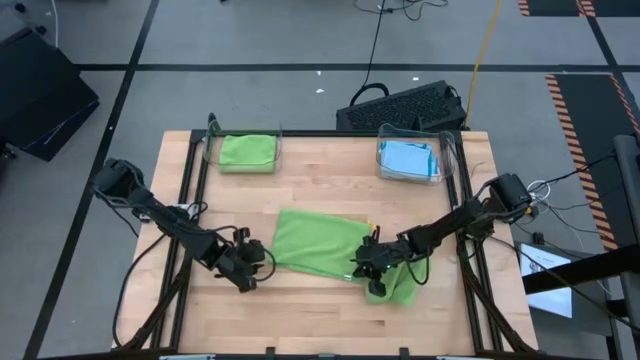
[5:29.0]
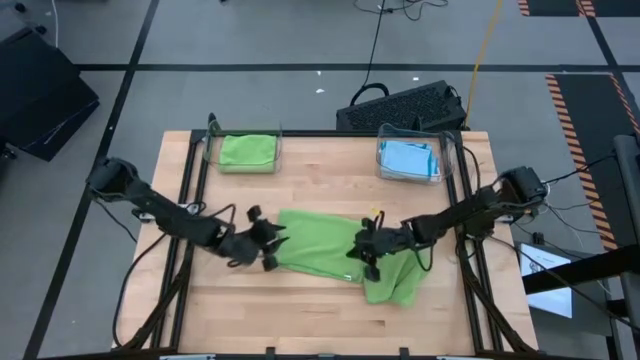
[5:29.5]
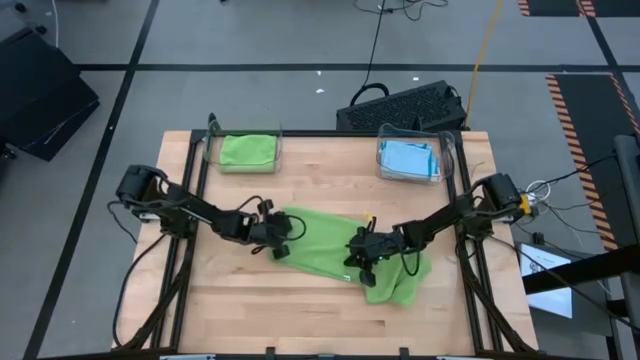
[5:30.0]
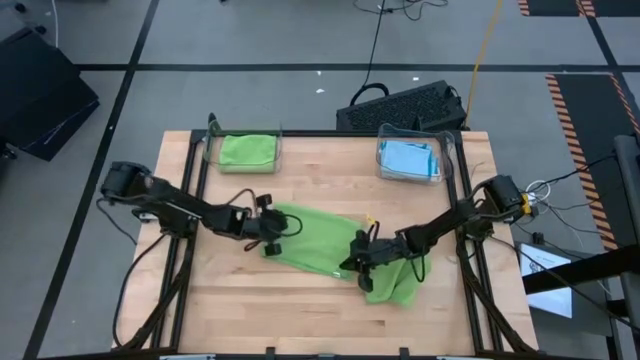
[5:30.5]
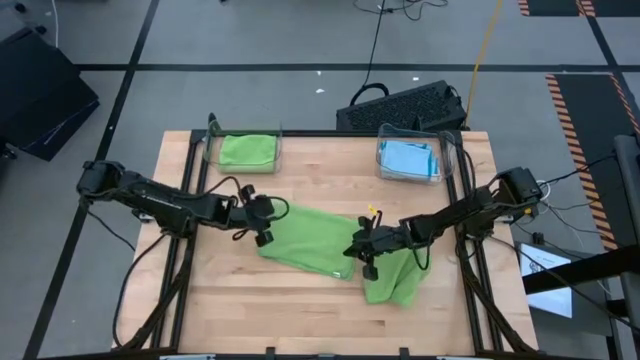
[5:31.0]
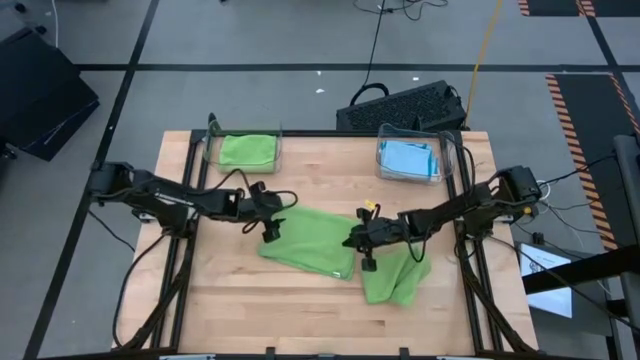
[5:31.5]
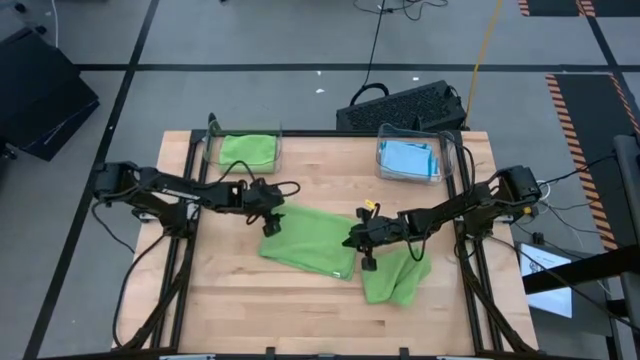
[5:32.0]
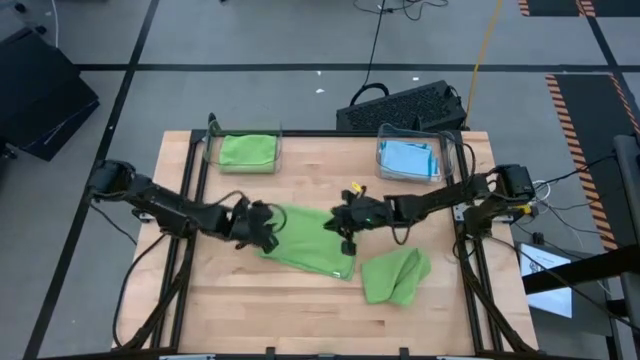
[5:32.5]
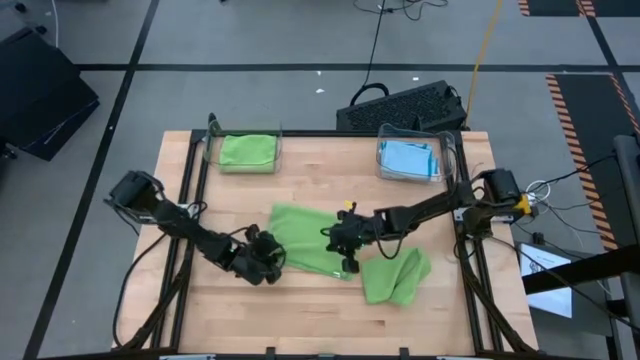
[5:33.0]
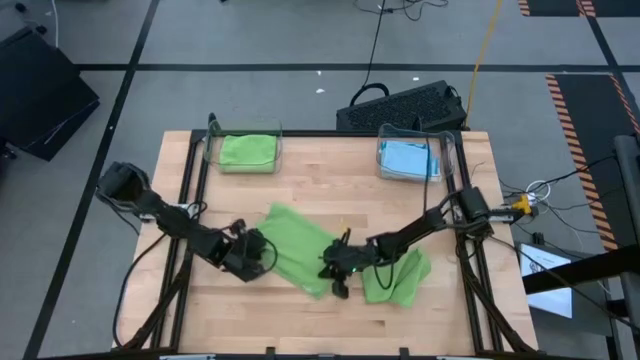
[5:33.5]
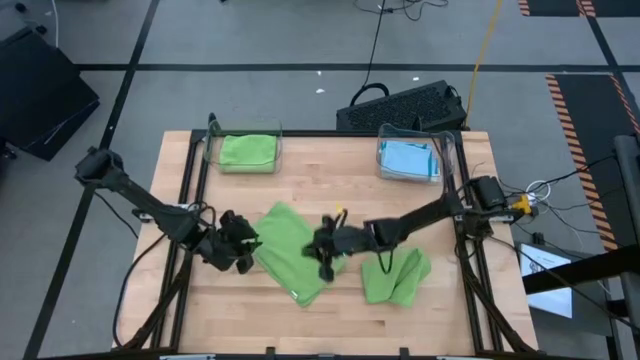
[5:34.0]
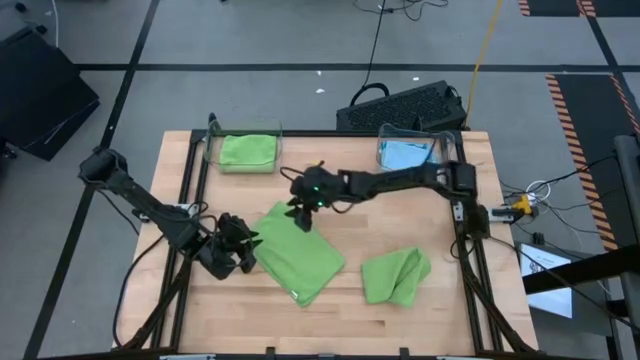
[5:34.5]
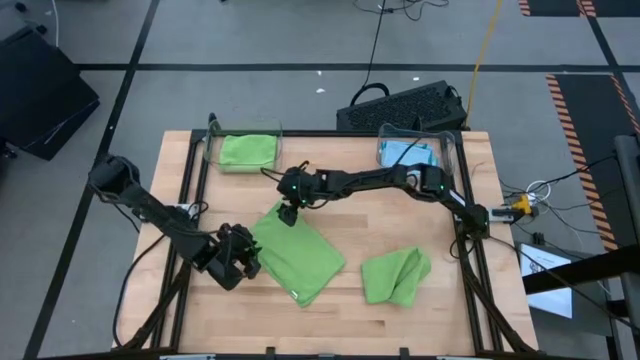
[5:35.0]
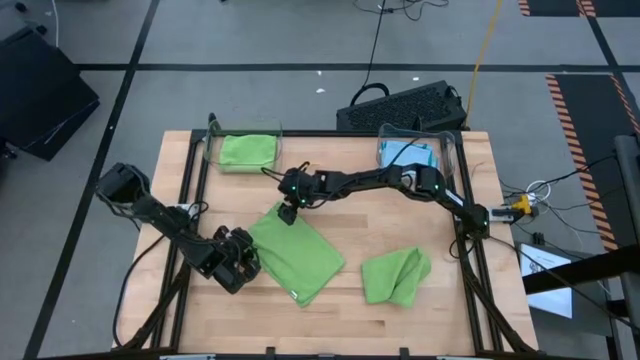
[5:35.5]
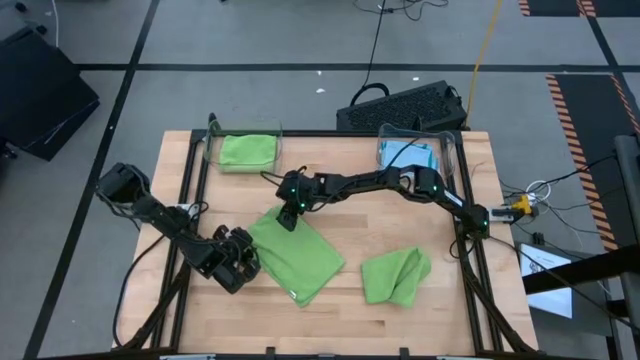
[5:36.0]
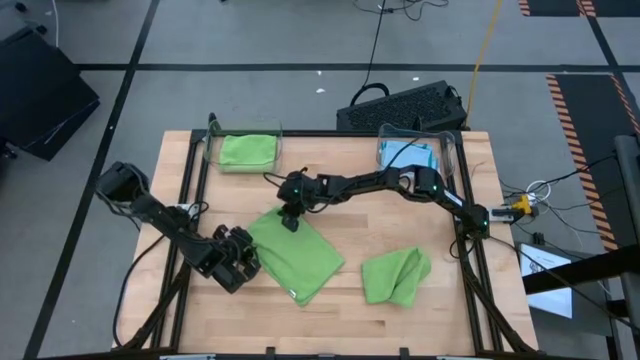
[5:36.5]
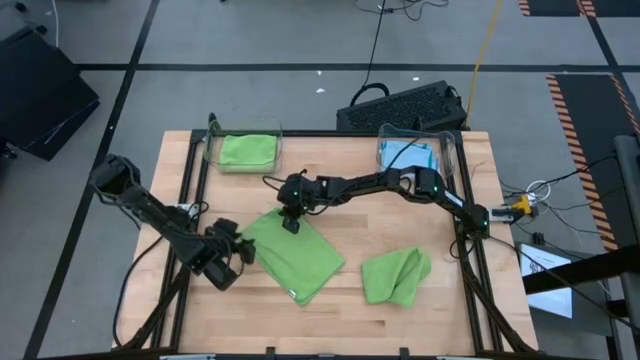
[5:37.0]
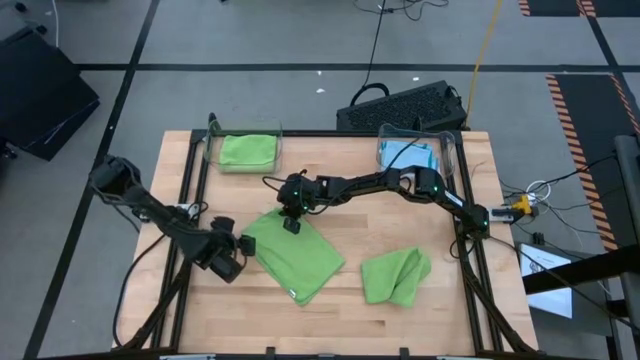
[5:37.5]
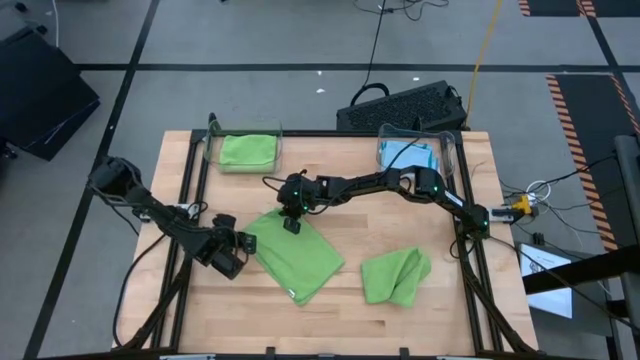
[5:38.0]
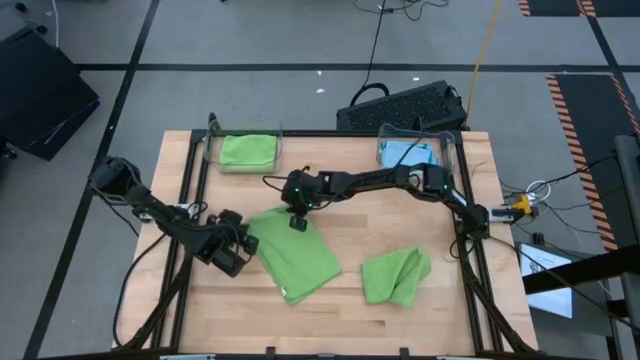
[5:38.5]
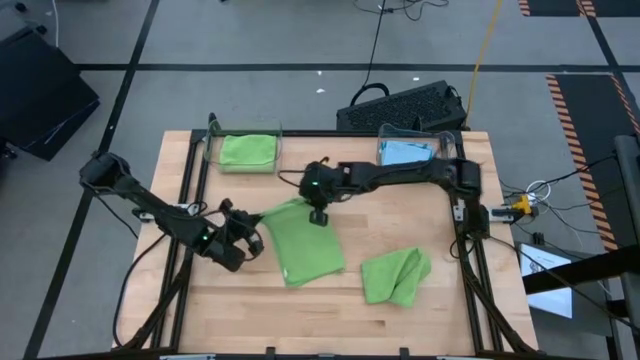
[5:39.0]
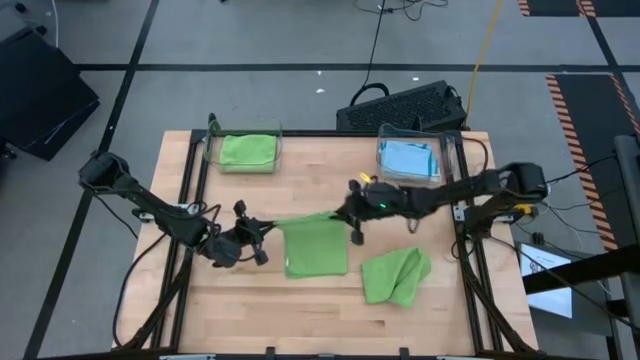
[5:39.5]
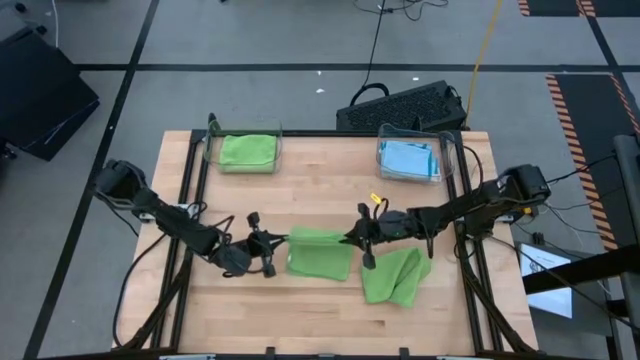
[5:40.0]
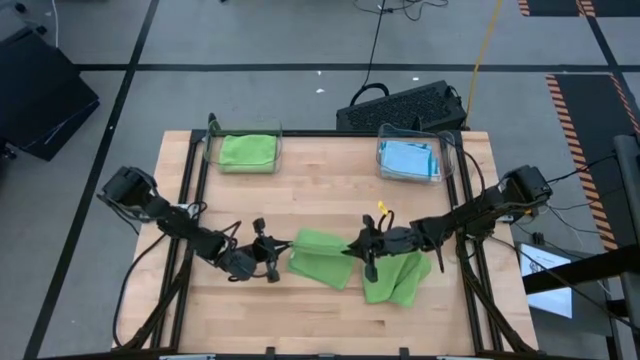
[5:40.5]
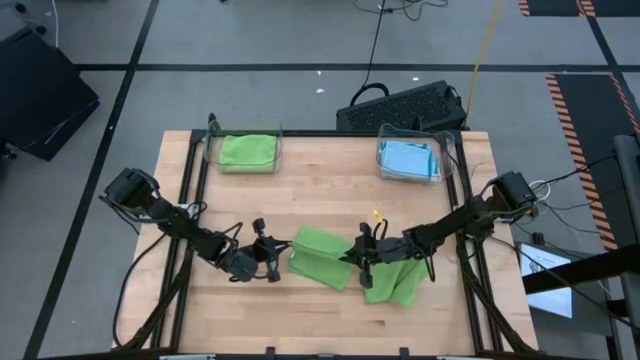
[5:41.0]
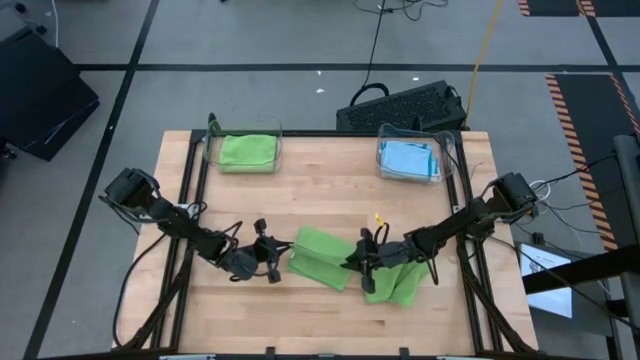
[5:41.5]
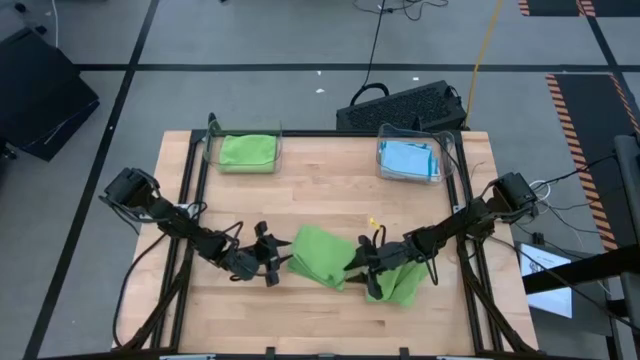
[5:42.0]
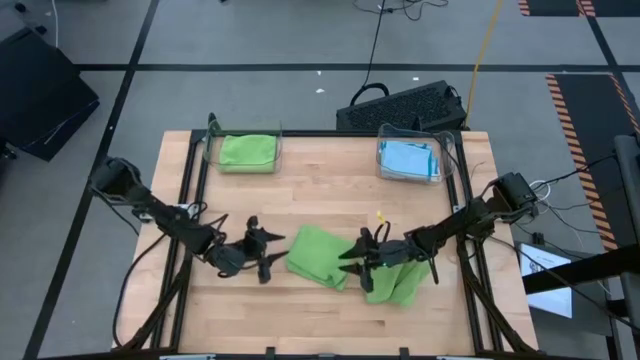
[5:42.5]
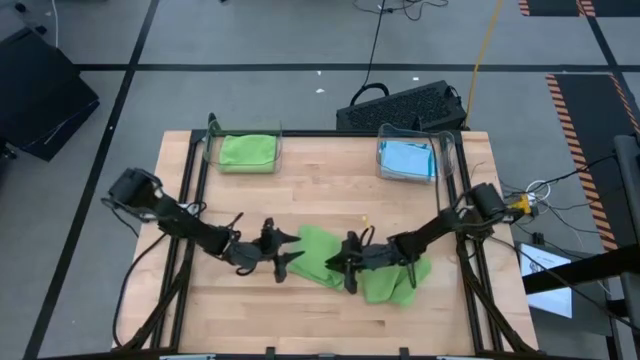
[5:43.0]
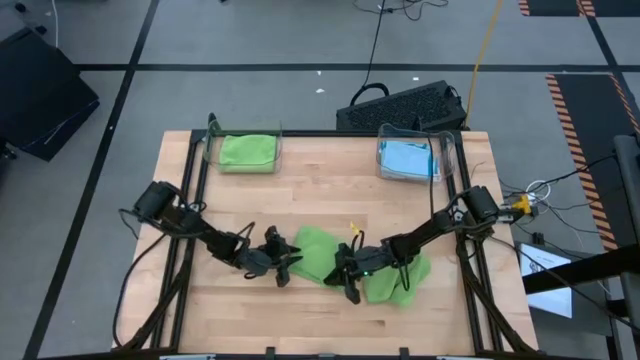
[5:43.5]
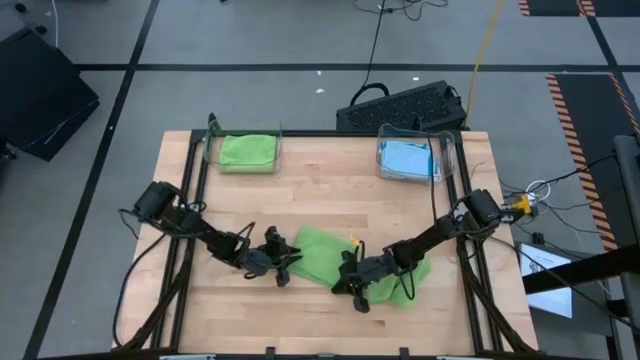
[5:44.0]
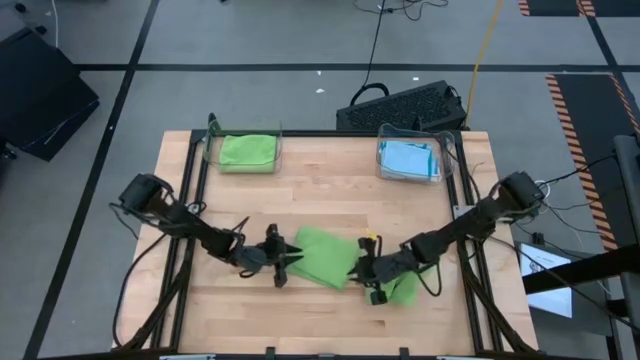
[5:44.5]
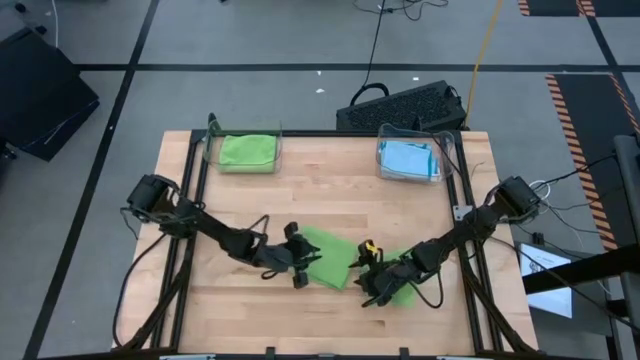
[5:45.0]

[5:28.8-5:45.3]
Task: Fold microfiber towels
Fold the left green microfiber cloth

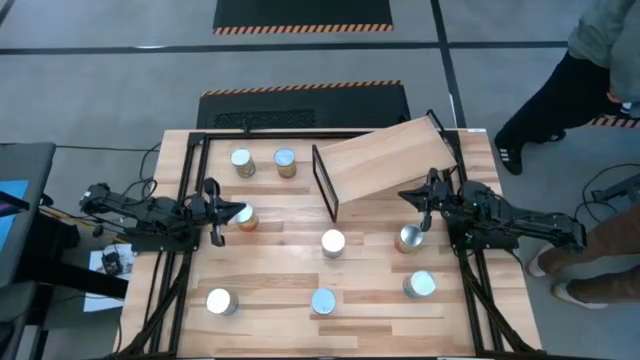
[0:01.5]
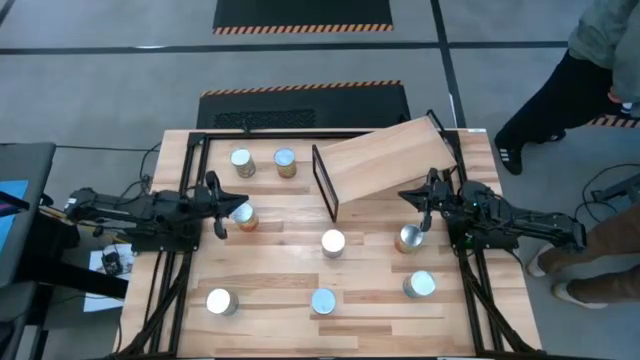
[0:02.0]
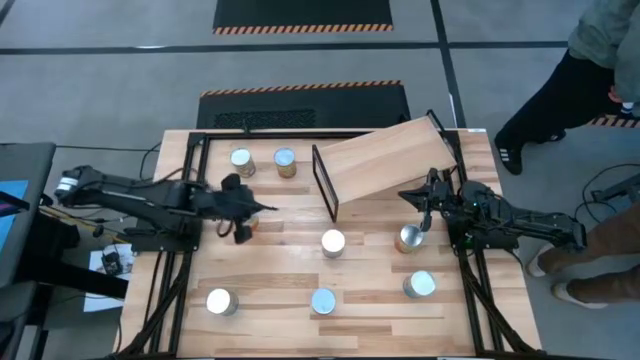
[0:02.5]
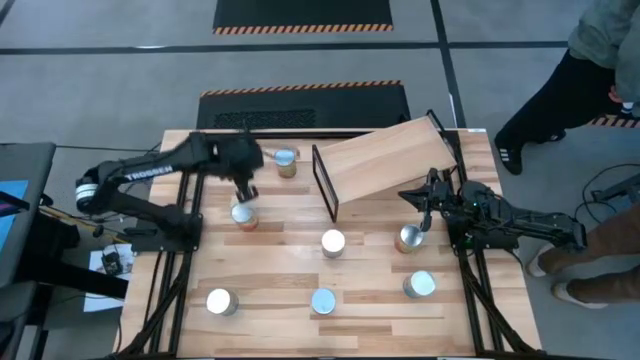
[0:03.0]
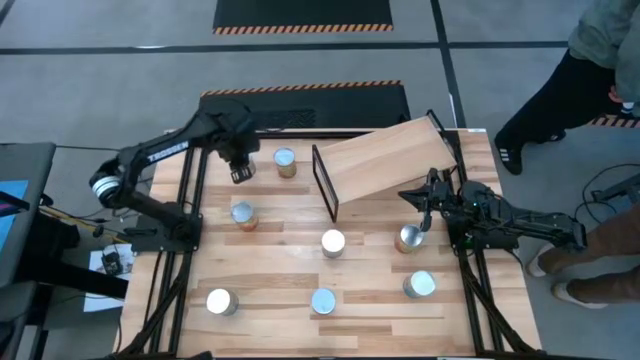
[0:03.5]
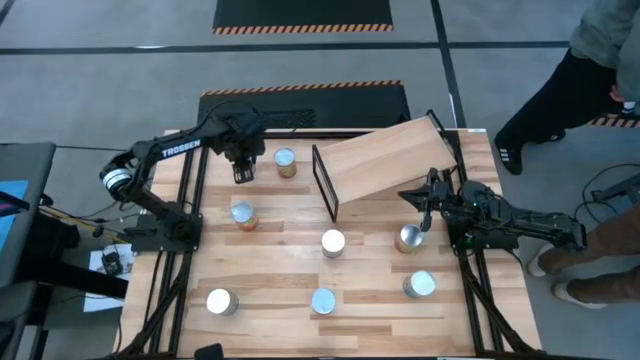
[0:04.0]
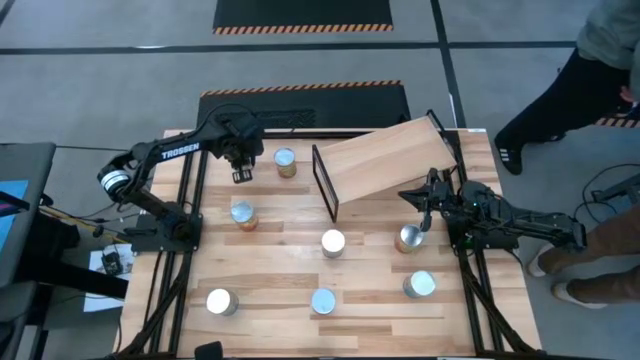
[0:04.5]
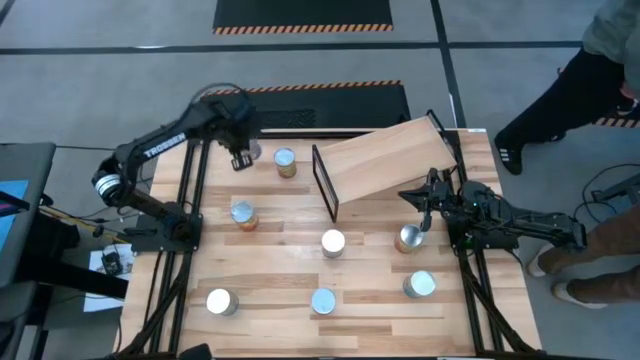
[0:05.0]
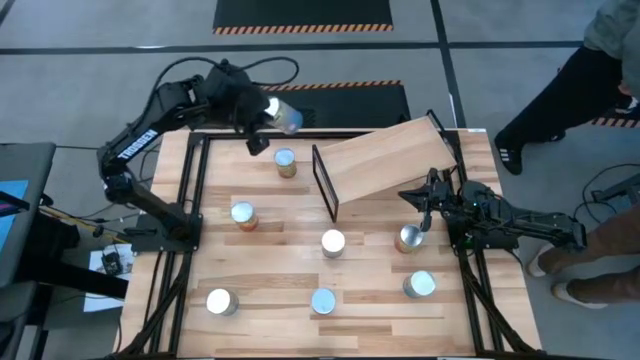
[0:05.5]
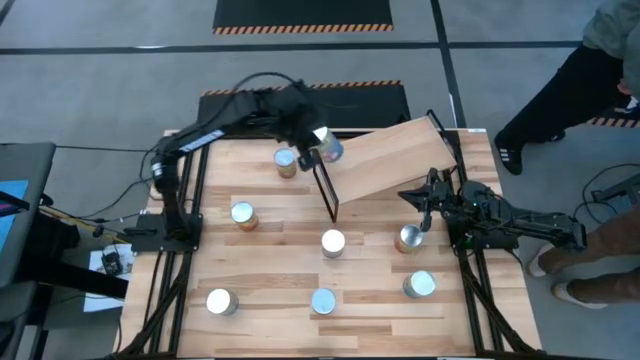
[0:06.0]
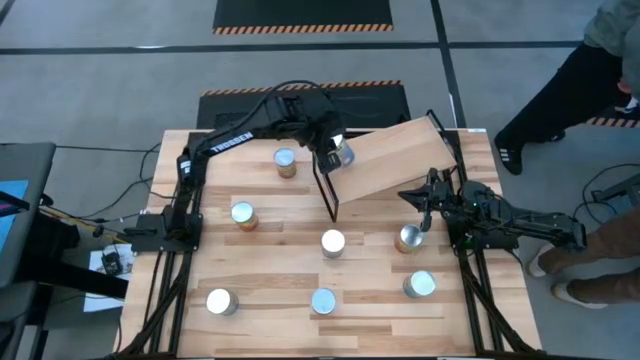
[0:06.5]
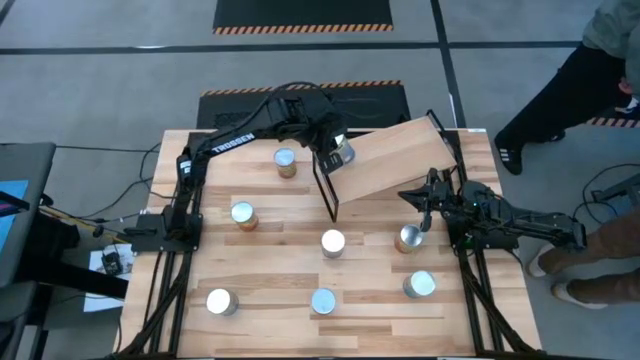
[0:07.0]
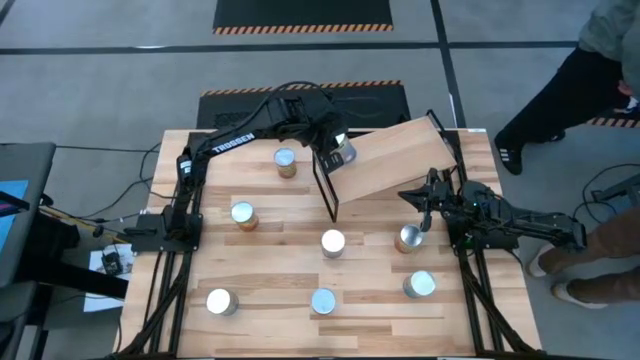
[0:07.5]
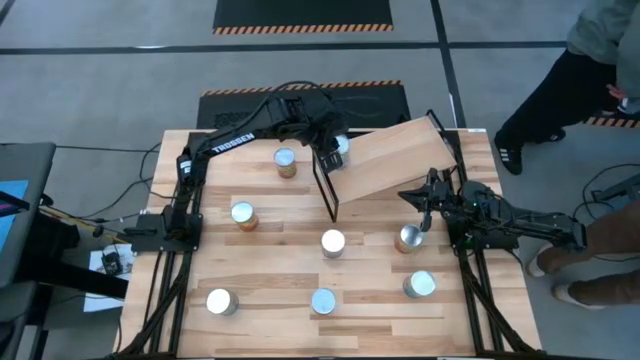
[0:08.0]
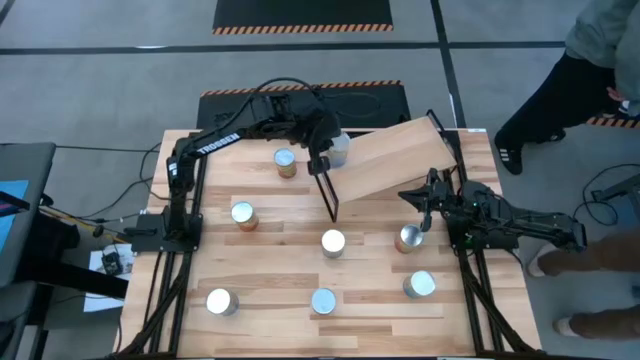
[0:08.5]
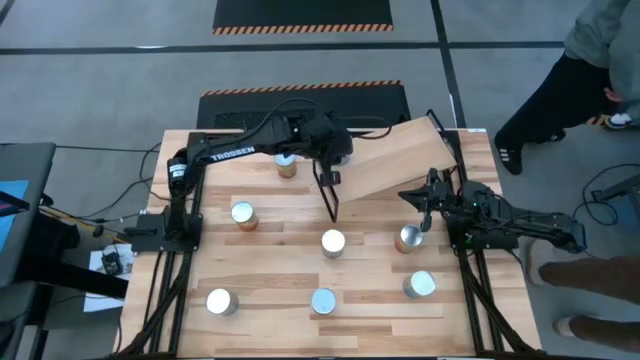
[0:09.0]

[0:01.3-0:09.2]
Task: Pick and place cans onto a shelf
Put the top canned peaches on the shelf
